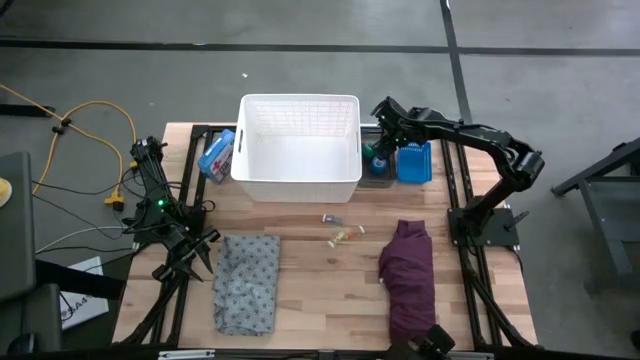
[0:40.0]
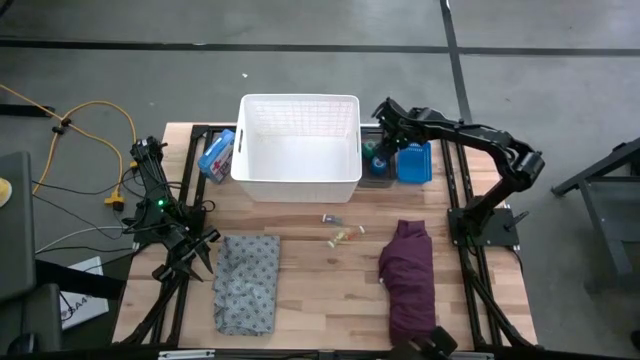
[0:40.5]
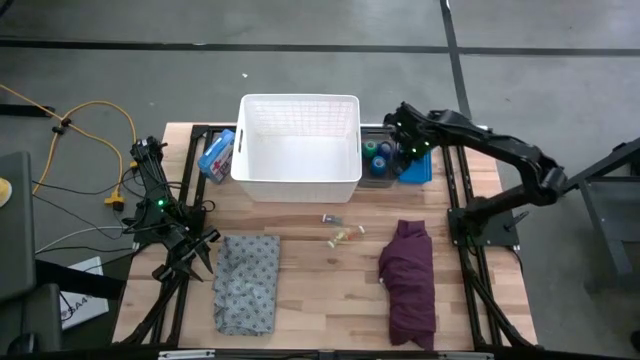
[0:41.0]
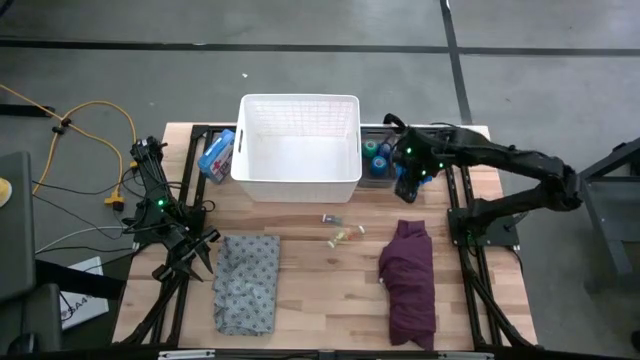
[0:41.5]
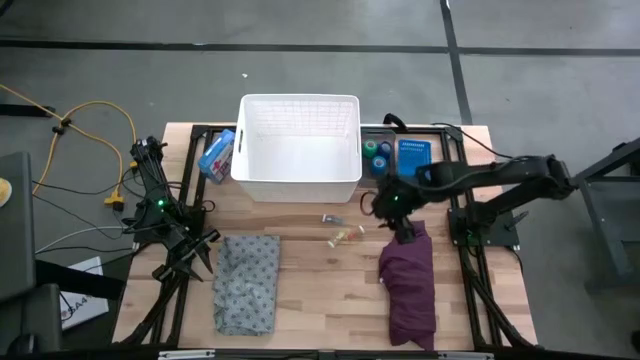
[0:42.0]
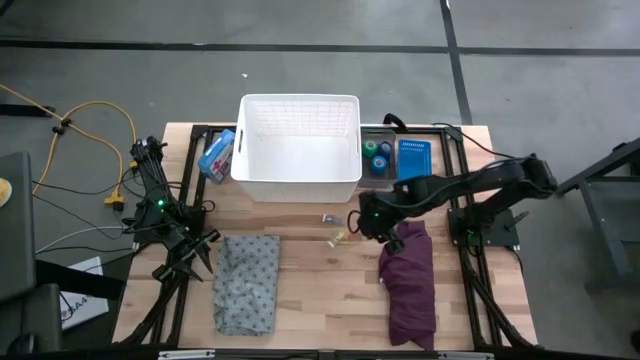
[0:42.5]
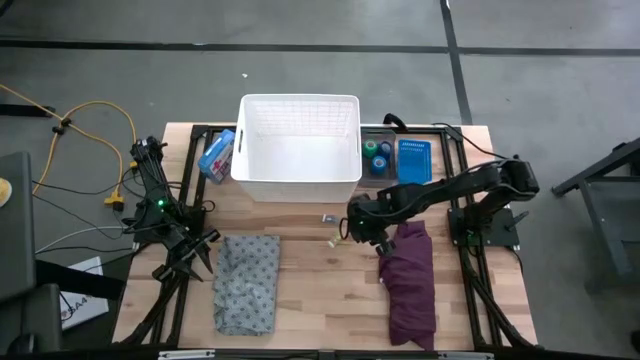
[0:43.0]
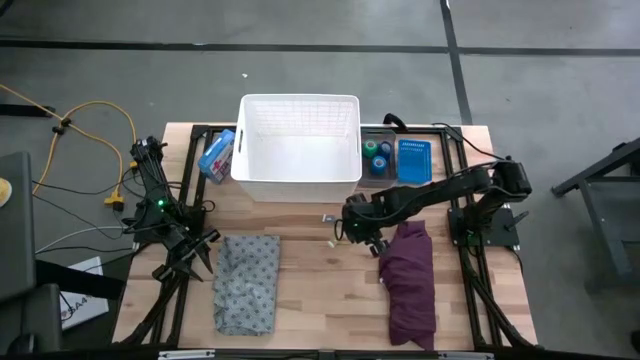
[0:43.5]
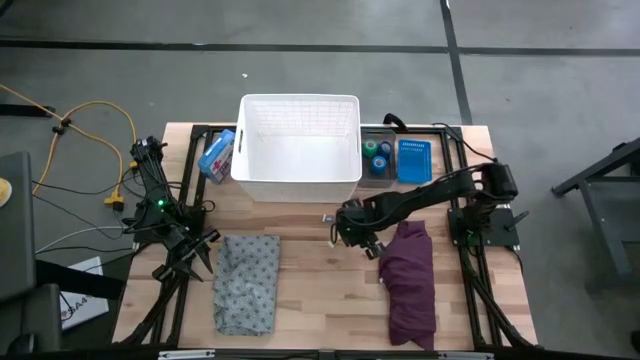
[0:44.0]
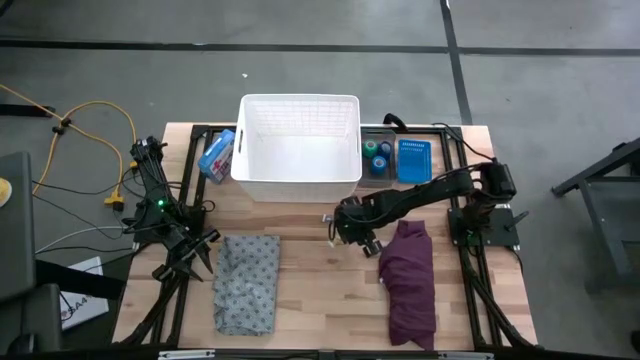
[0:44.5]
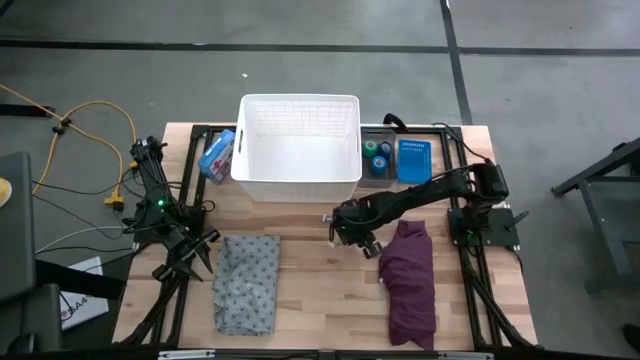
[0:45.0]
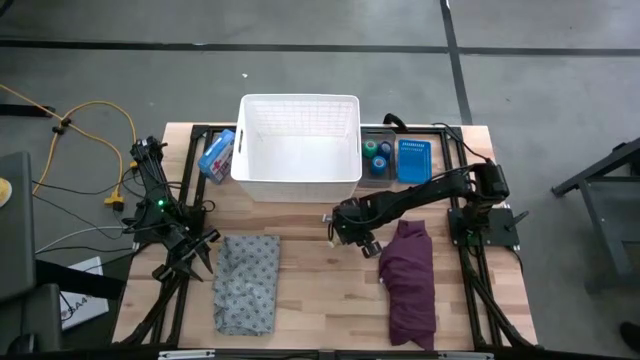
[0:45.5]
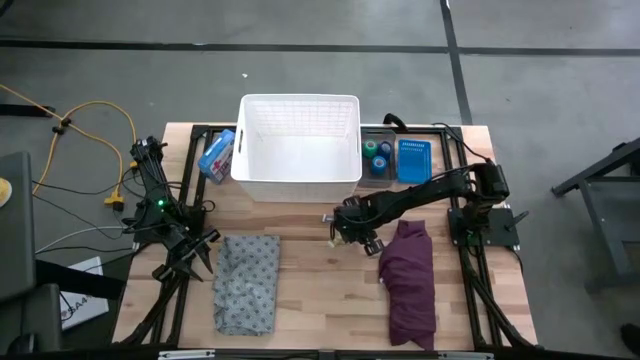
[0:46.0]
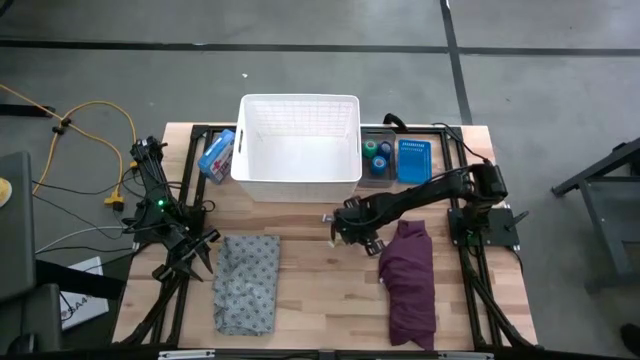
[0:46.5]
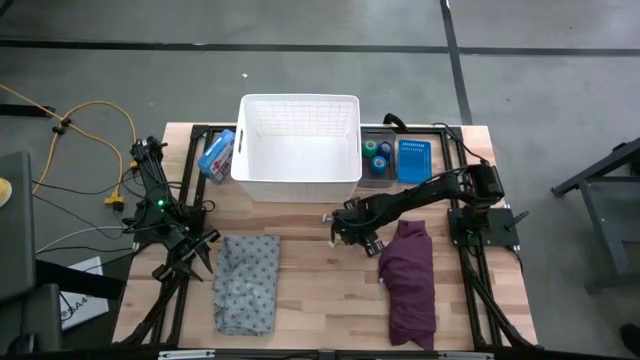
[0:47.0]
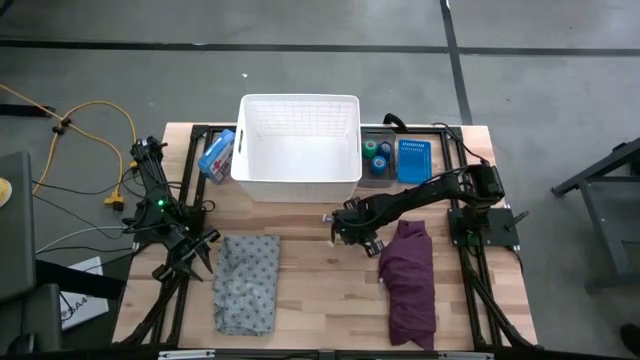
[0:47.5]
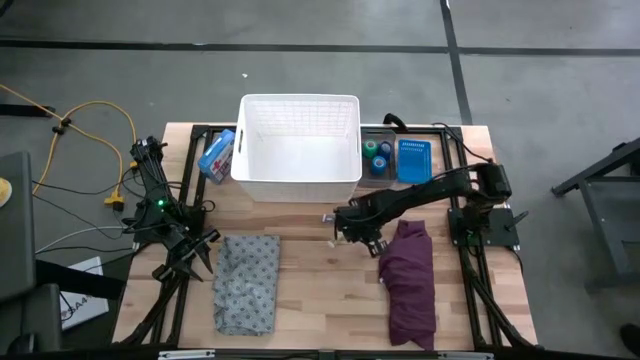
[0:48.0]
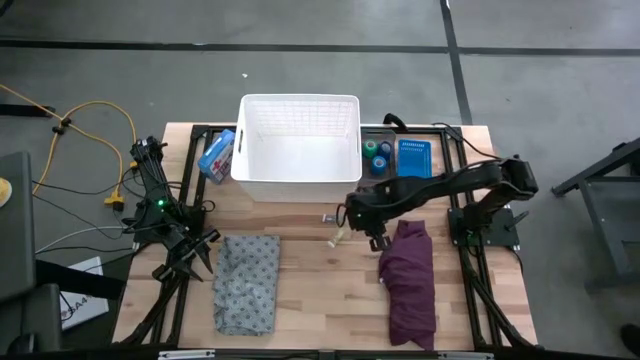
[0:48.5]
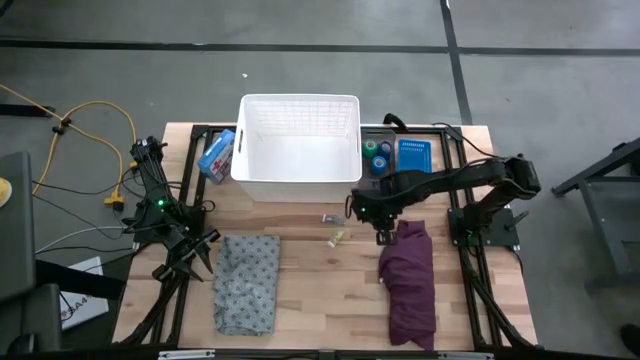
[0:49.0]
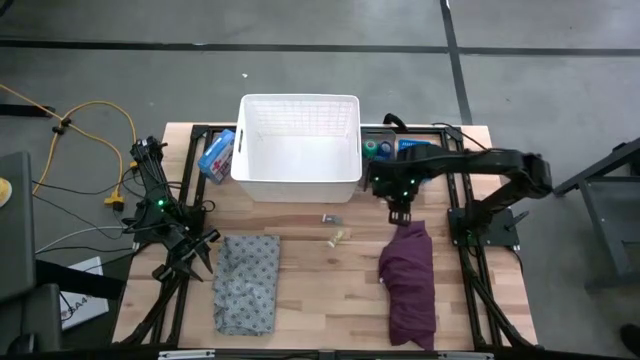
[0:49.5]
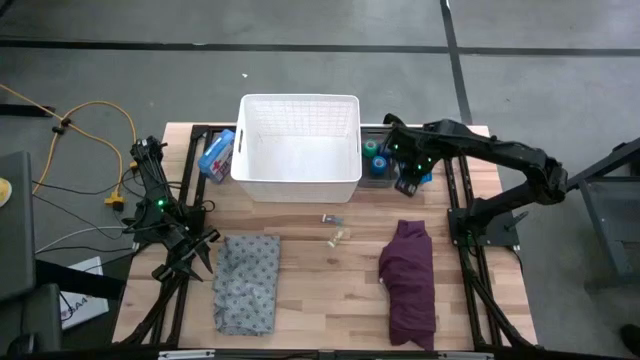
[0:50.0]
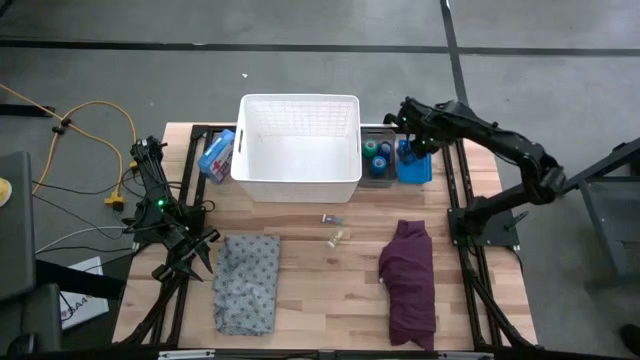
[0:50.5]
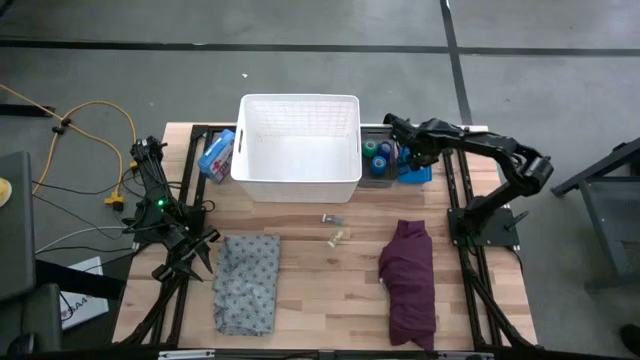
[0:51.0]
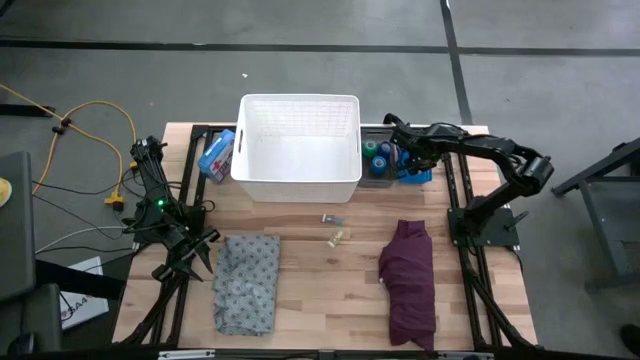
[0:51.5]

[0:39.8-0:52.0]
Task: Pick & Place Medicine items
Put the right yellow pill bottle into the blue bin

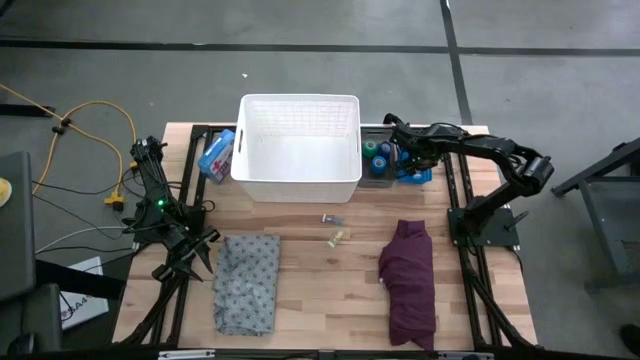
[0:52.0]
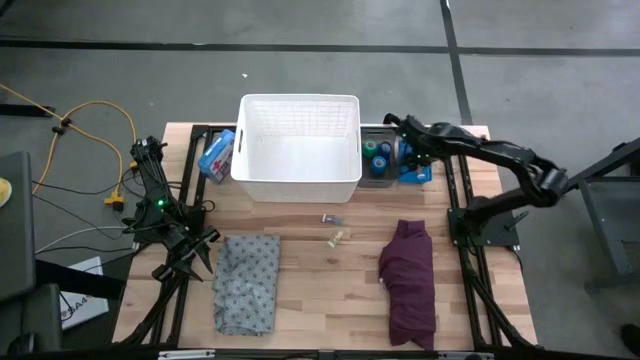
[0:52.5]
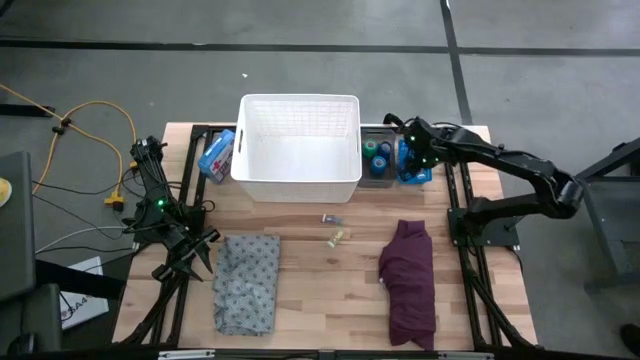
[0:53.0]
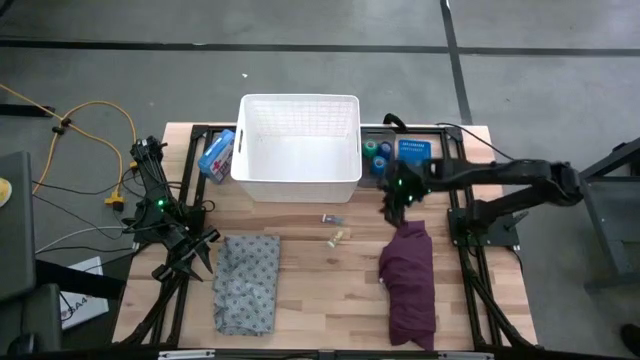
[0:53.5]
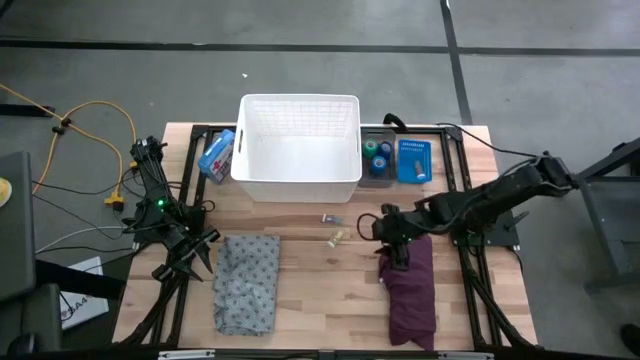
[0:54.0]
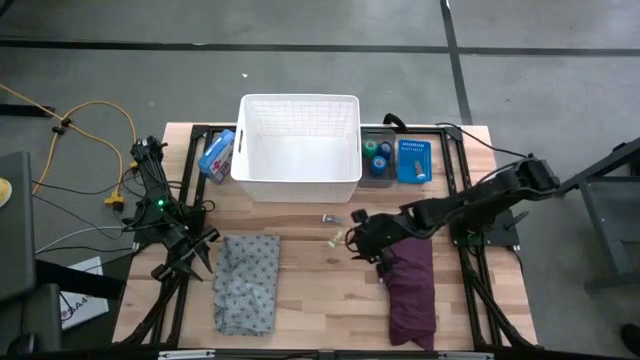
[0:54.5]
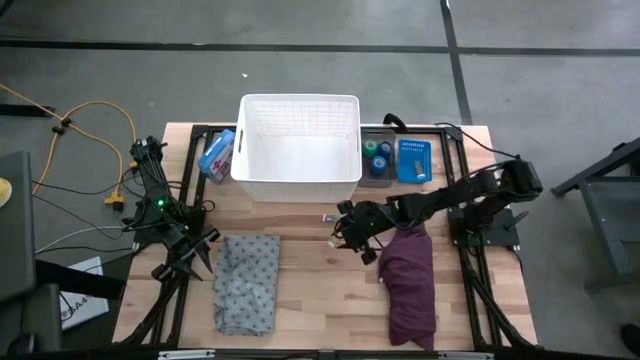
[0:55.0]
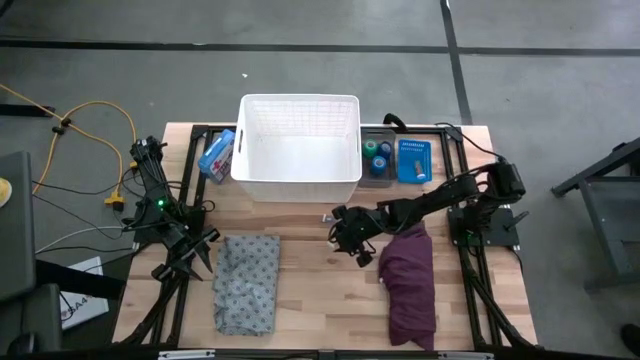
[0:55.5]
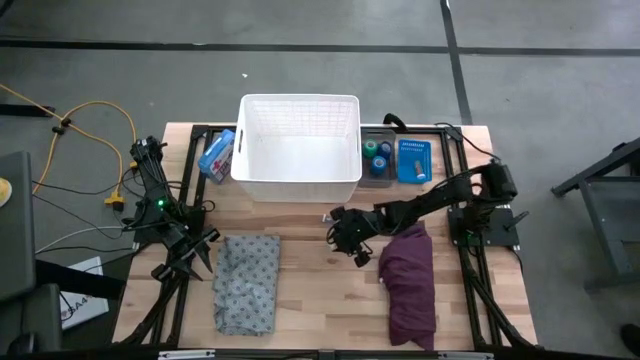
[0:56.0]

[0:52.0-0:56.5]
Put the yellow pill bottle into the blue bin

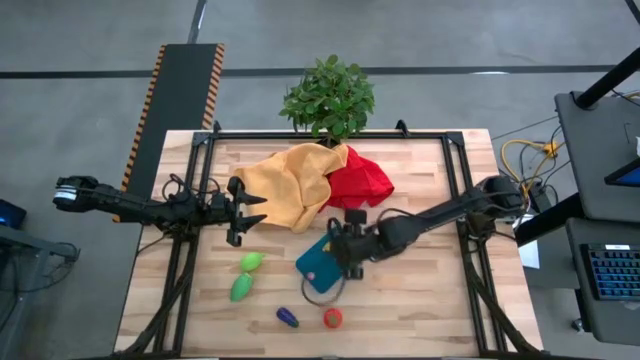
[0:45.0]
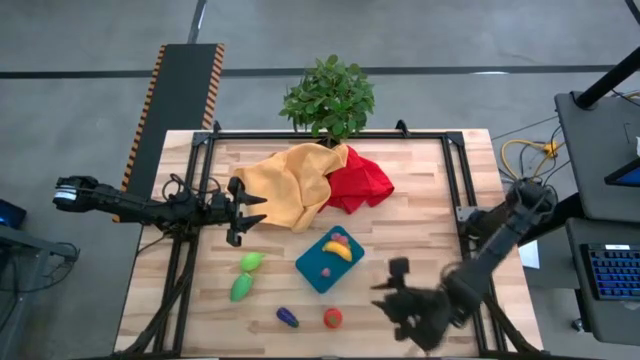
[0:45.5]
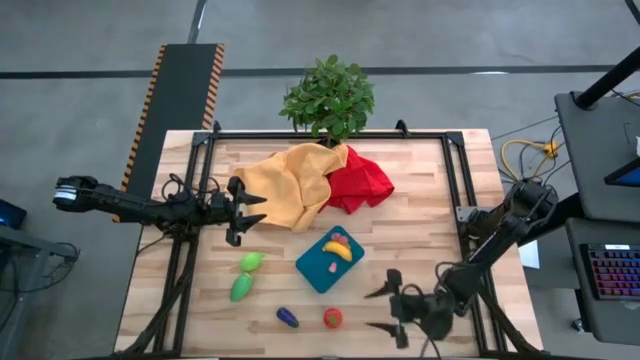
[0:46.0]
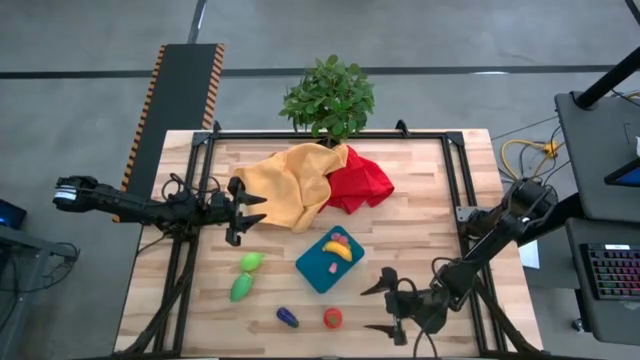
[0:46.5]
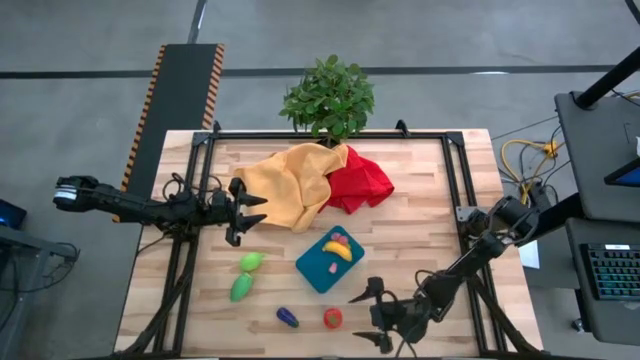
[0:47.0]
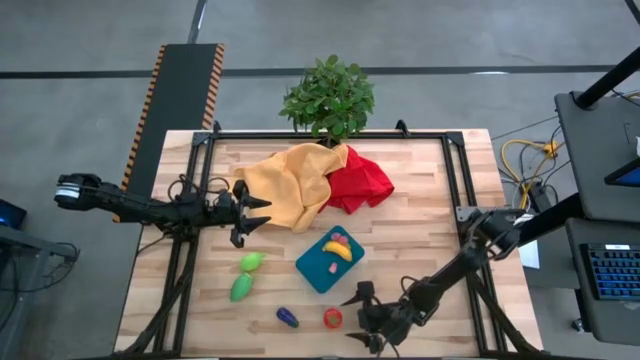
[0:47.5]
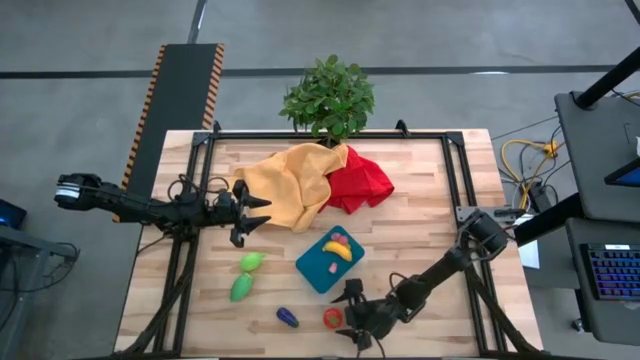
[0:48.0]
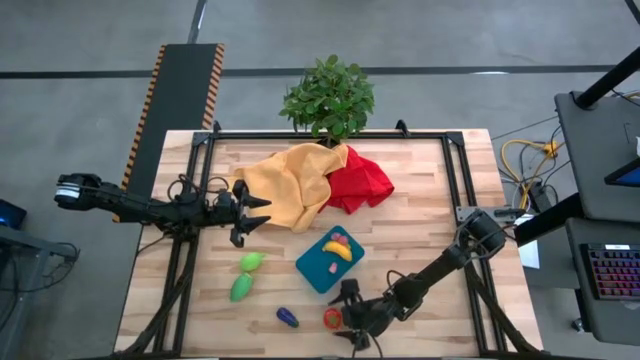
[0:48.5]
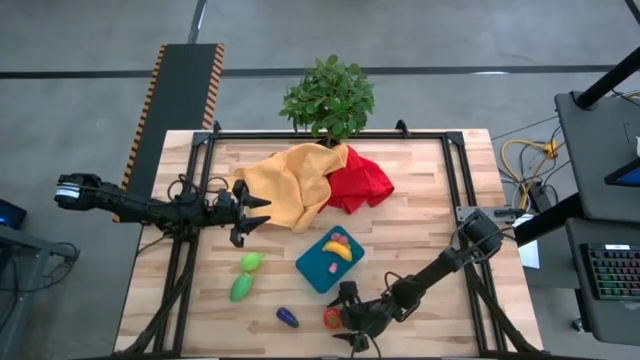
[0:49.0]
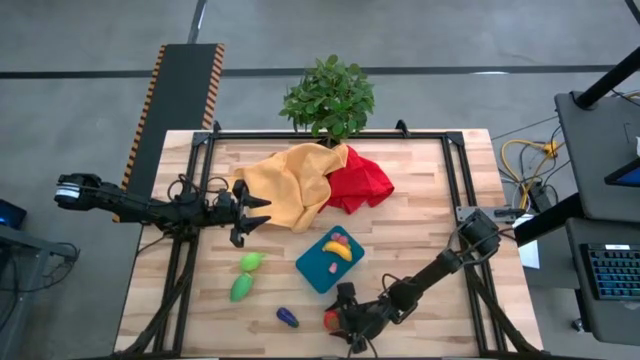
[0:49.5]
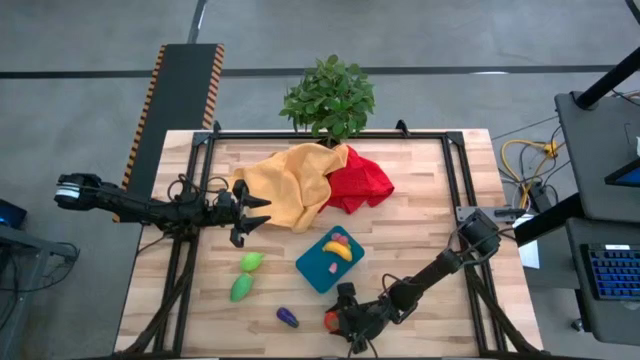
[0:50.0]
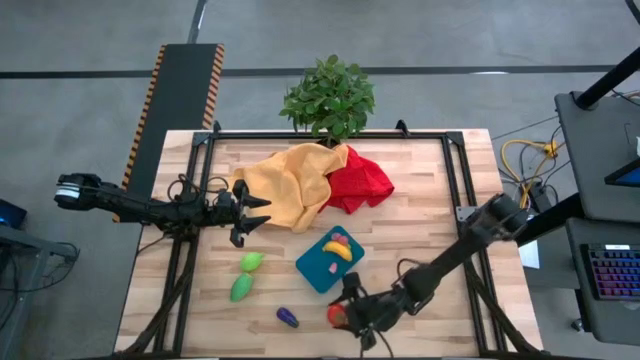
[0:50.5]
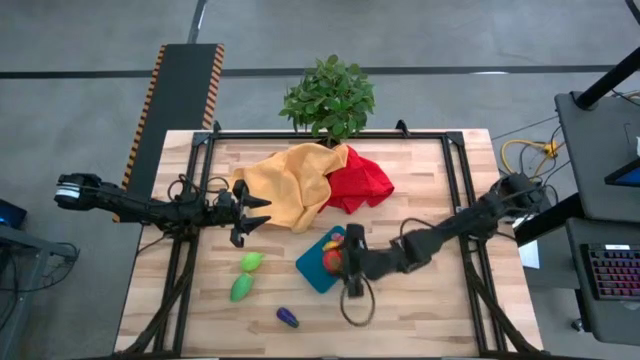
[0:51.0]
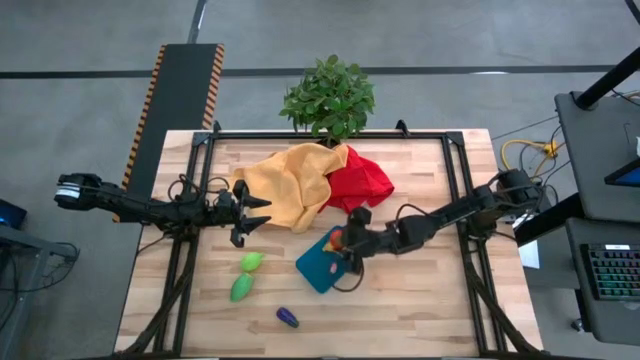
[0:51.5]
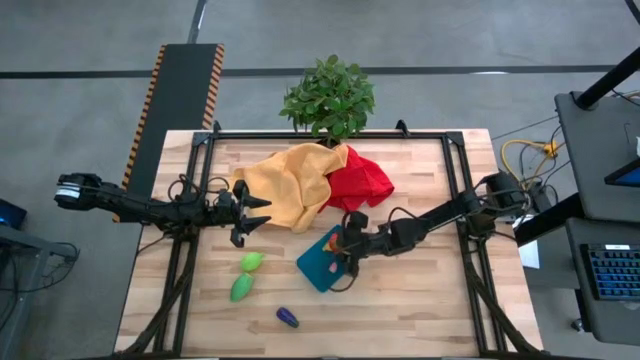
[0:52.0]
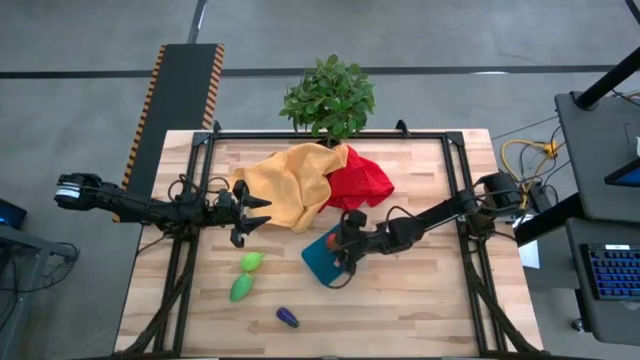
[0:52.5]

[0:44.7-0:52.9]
Task: Pick and placing Produce into tupperware
Put the red tomato into the blue bin
